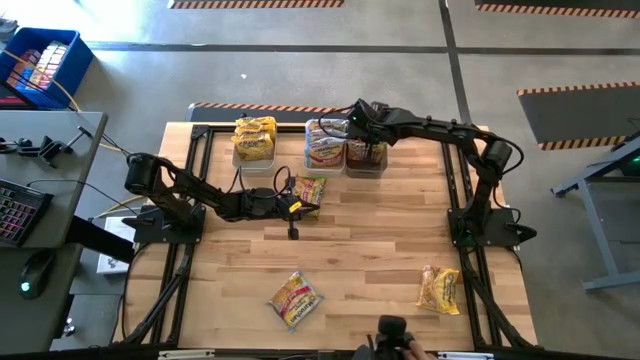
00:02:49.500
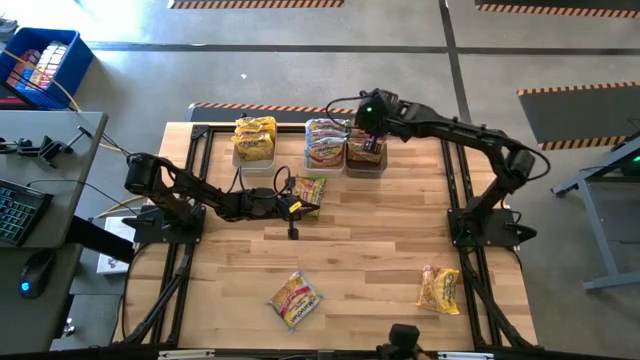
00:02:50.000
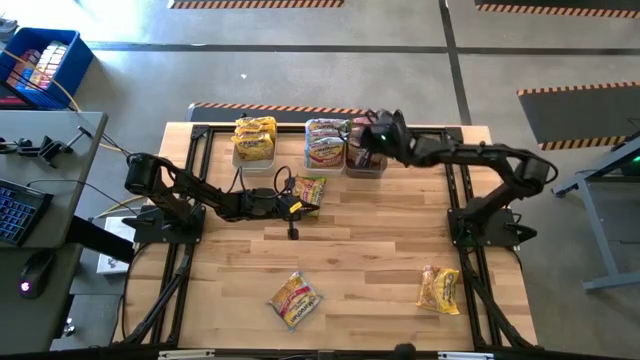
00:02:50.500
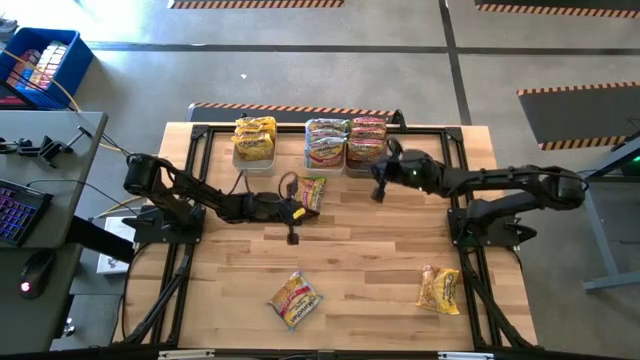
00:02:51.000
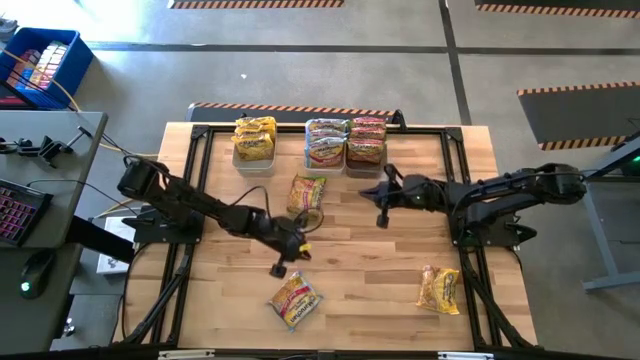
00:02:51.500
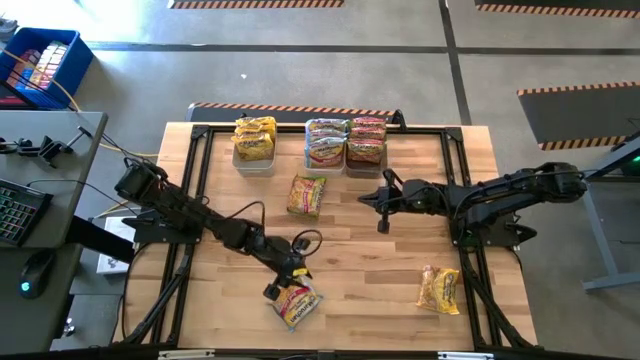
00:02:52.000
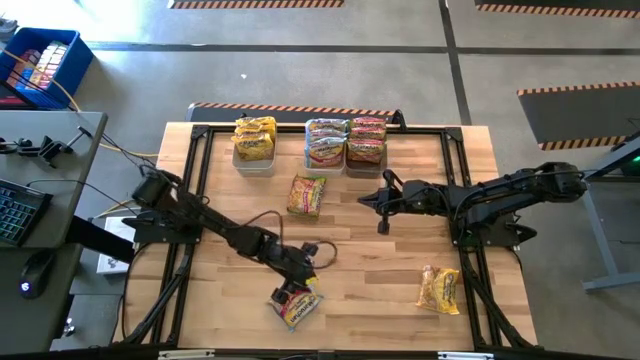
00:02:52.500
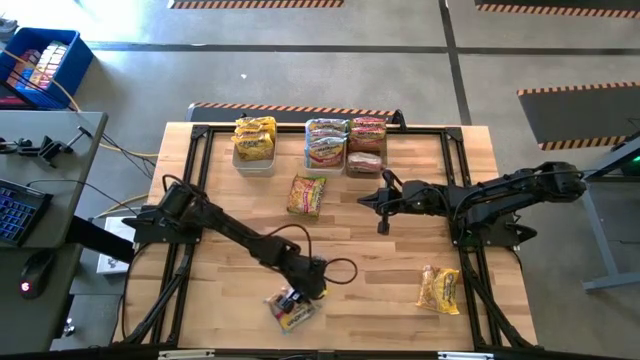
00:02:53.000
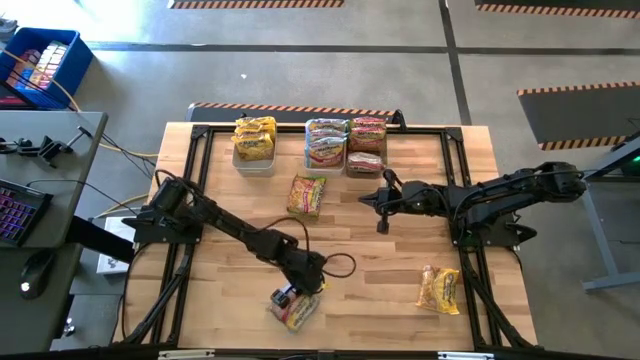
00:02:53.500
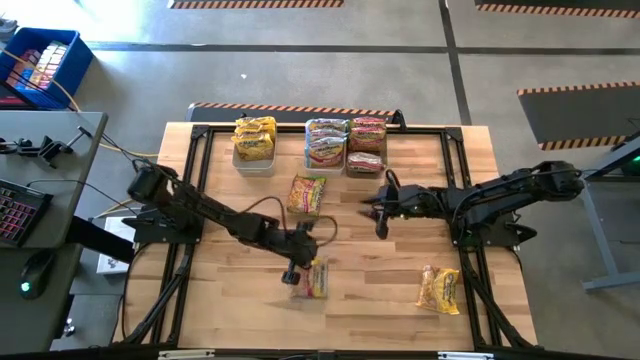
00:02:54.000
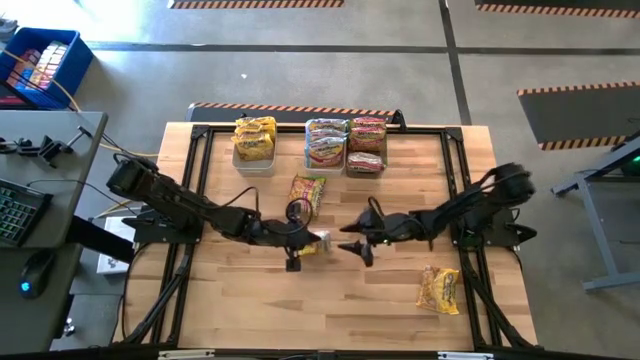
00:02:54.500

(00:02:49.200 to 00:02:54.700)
Task: Sort Maruchan noodles
Put the lower left blue noodle pack into the transparent white bin

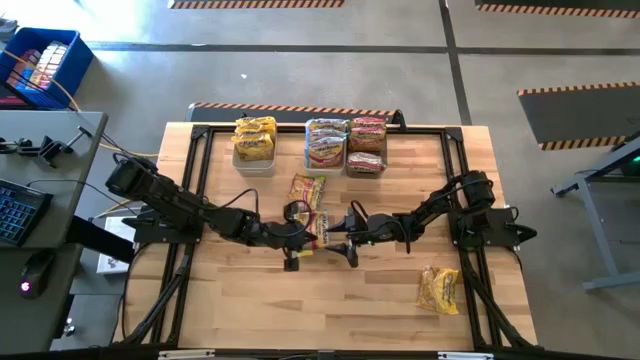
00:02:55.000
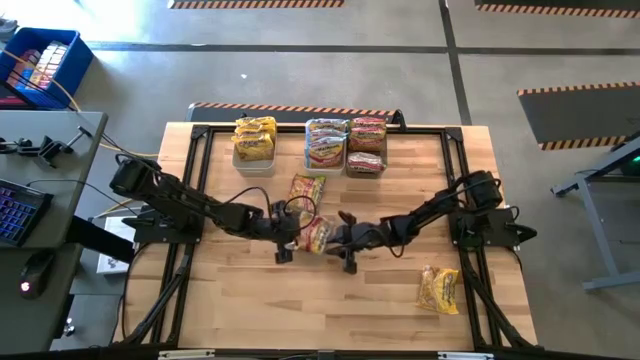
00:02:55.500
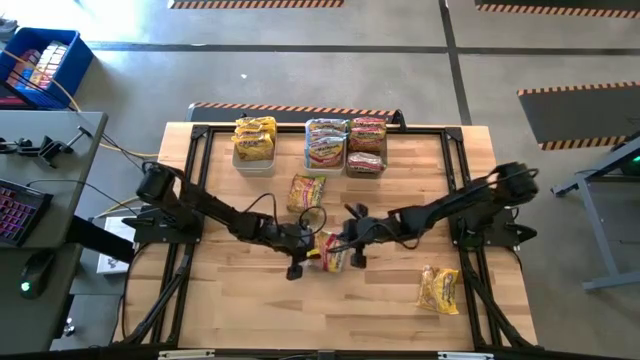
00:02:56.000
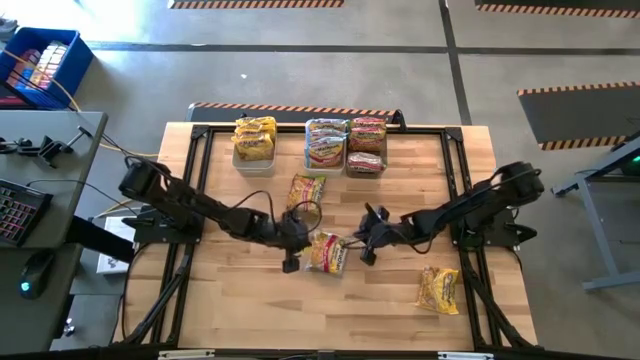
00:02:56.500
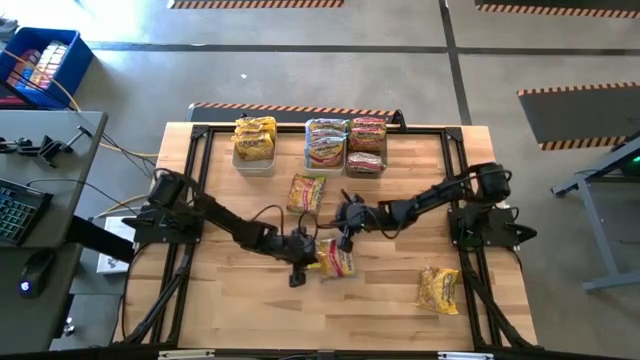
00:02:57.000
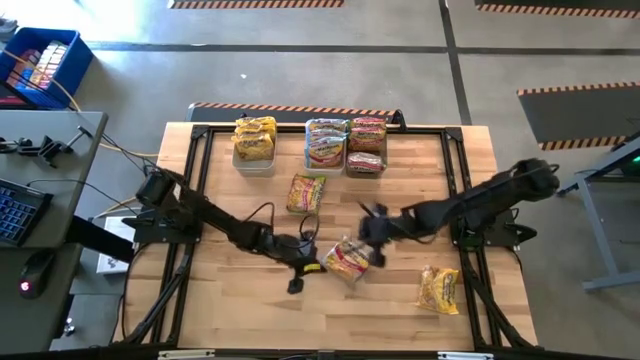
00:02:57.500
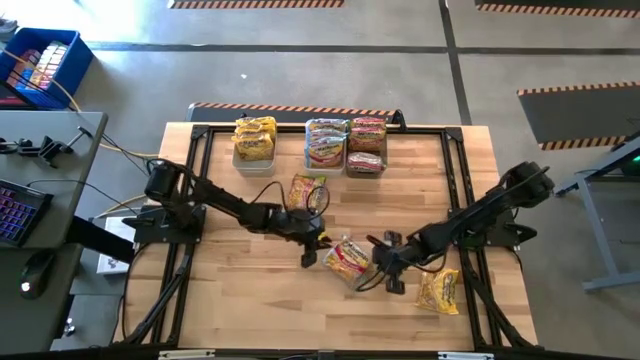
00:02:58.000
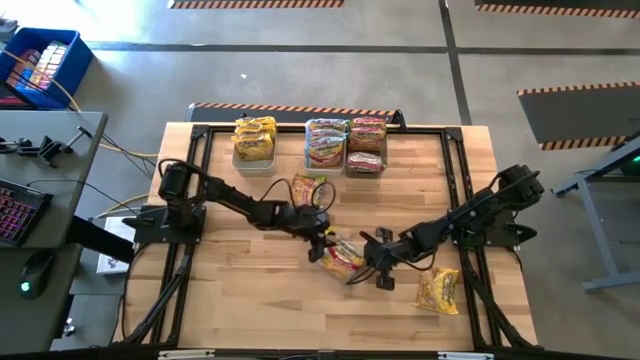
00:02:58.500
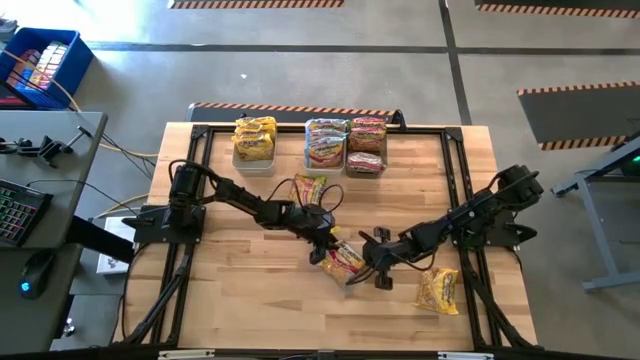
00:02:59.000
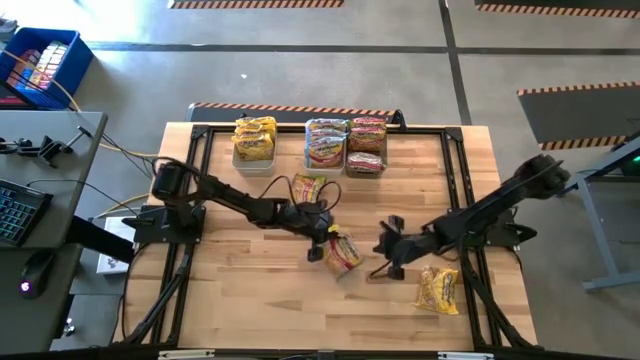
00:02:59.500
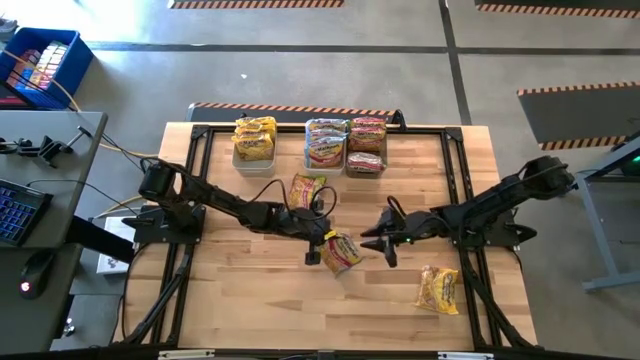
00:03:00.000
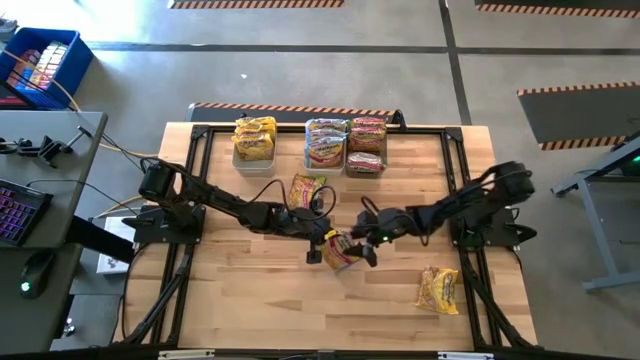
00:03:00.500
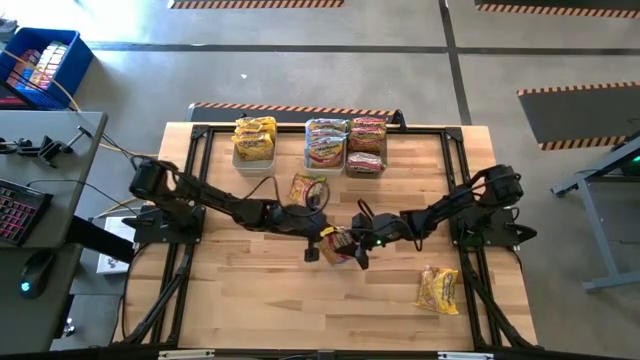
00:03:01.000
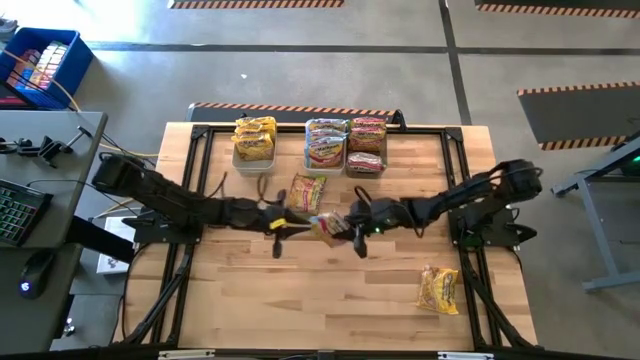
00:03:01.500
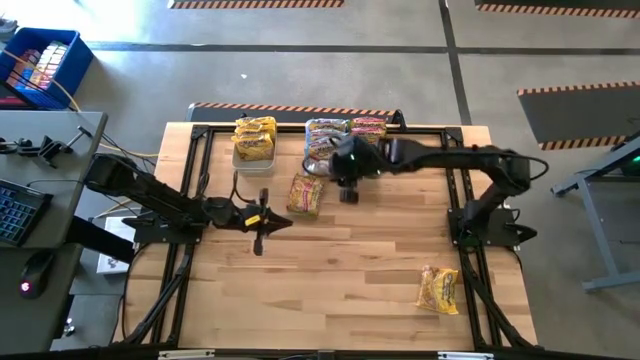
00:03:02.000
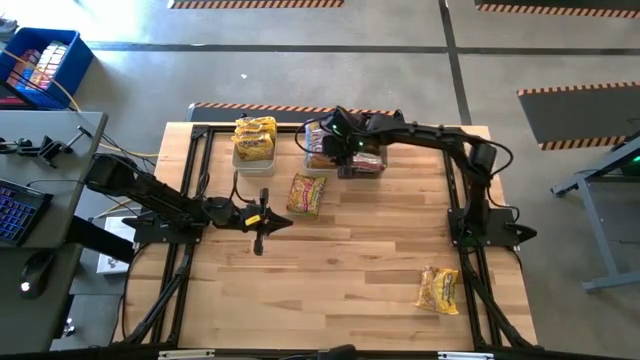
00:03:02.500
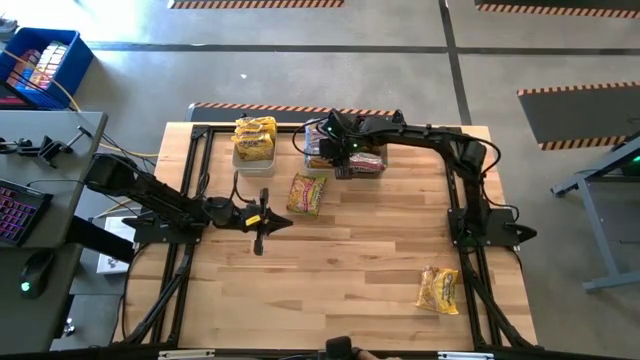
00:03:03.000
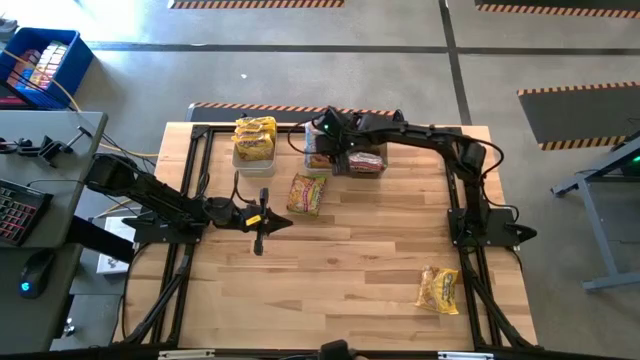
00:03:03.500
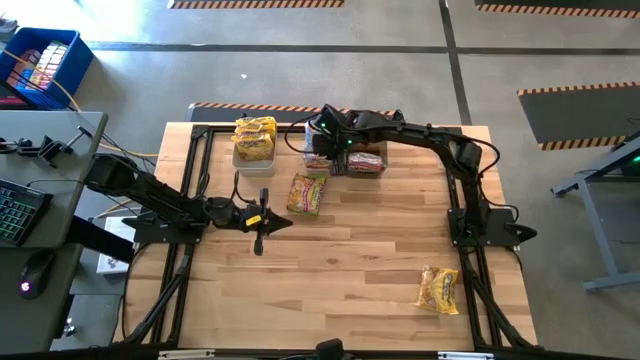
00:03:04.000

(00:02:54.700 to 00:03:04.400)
Put the lower left blue noodle pack into the transparent white bin

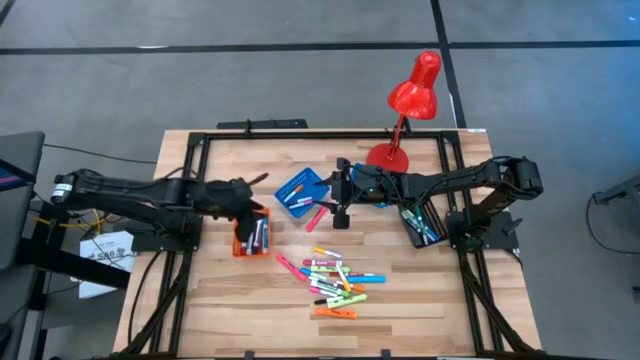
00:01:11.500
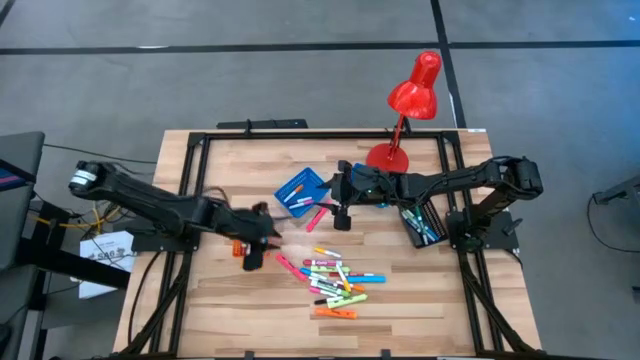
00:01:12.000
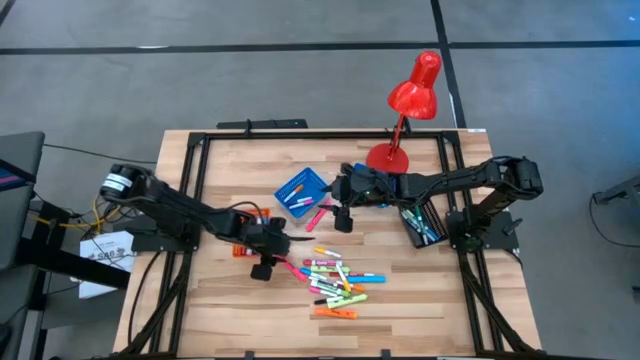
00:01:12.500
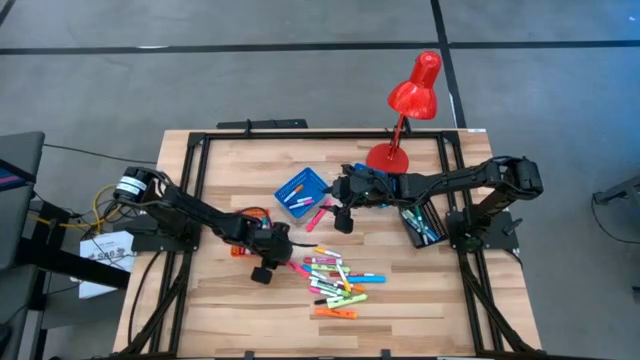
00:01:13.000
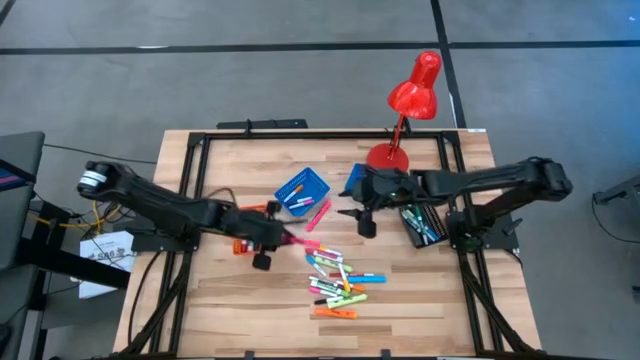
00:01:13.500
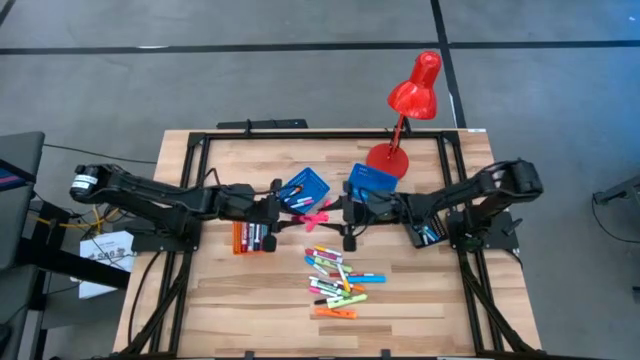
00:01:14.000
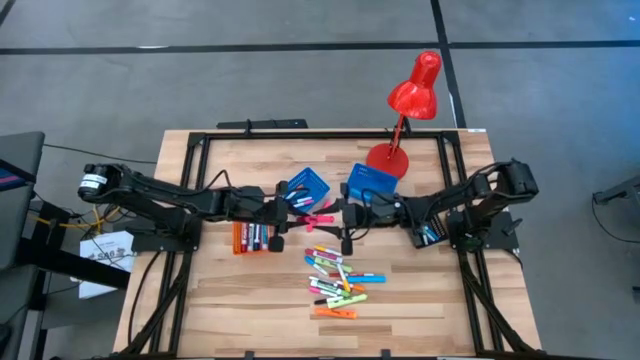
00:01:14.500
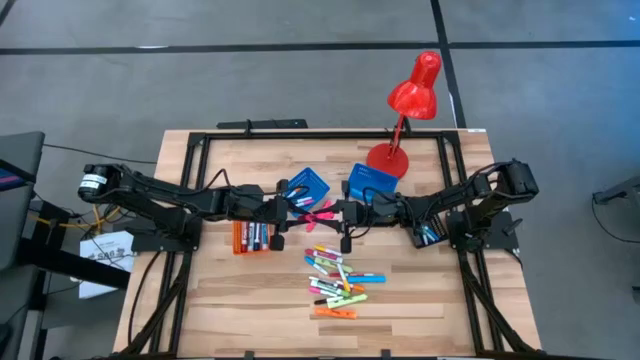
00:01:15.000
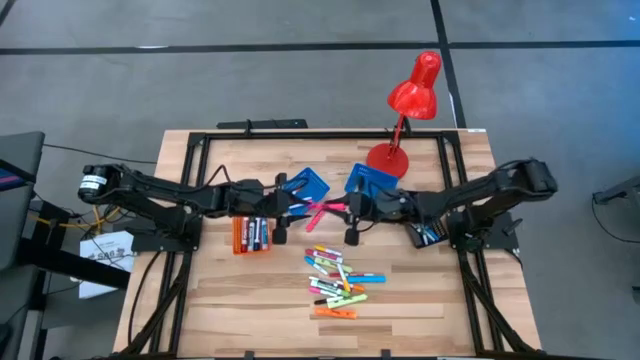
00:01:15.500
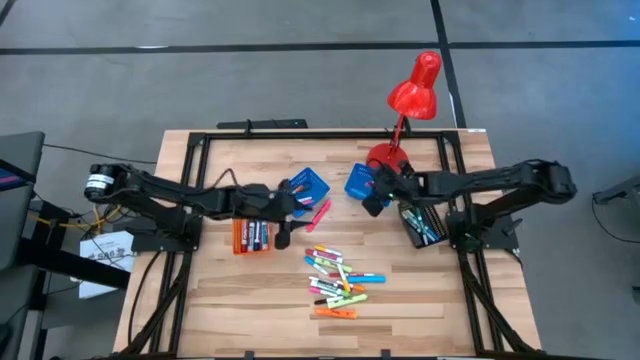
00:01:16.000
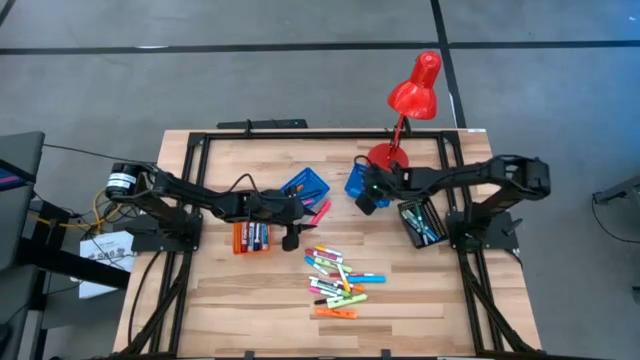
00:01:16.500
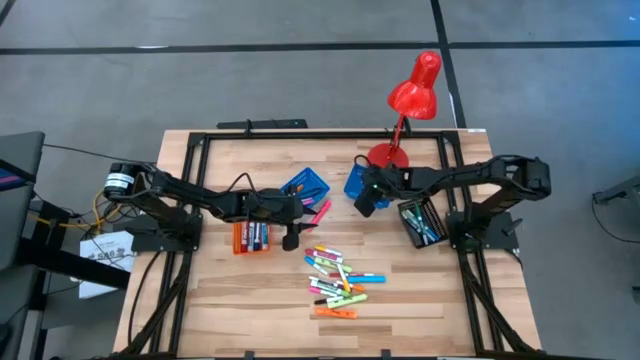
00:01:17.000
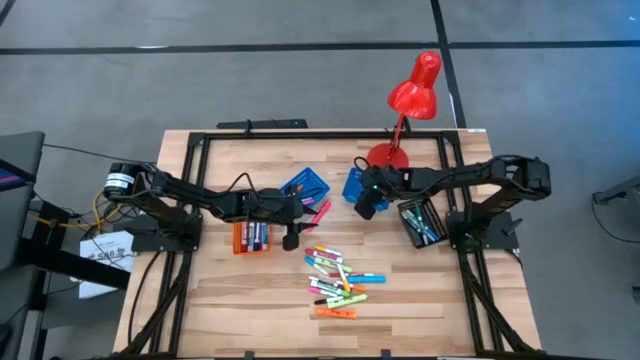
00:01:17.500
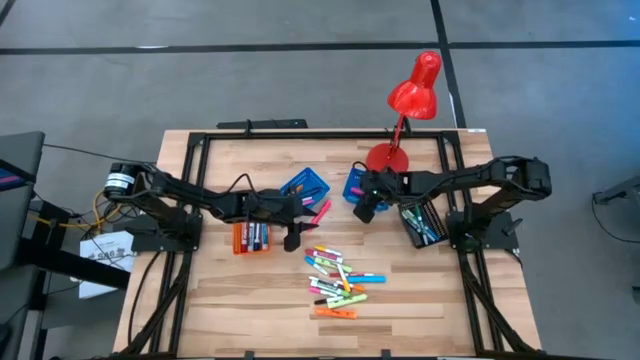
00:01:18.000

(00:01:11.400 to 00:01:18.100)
Task: Pick & Place Markers
Put the bottom large pink highlighter pen into the right blue bin
